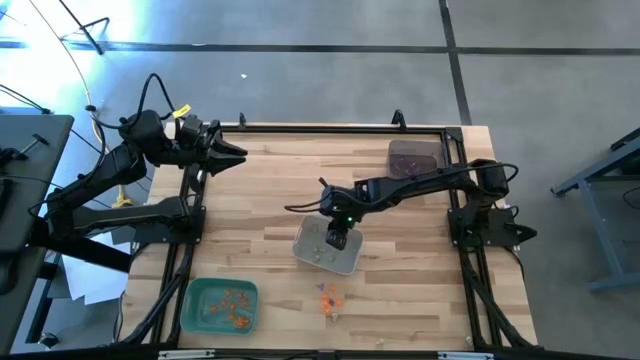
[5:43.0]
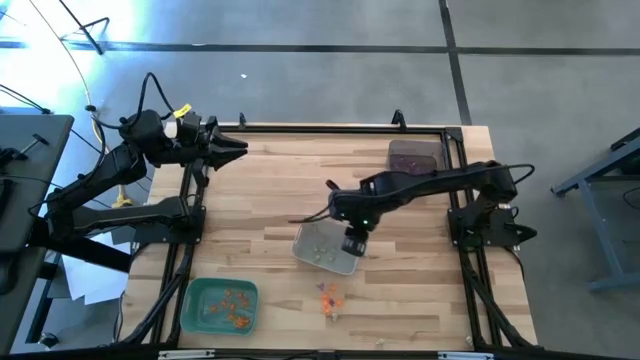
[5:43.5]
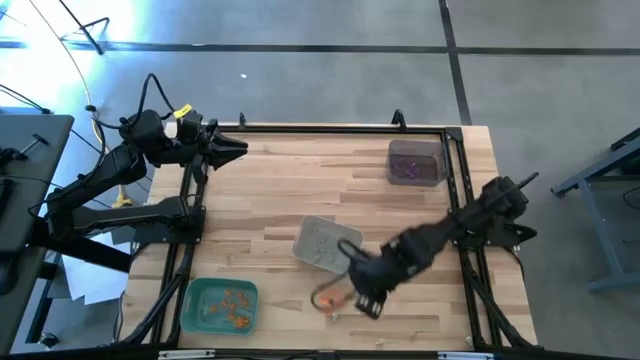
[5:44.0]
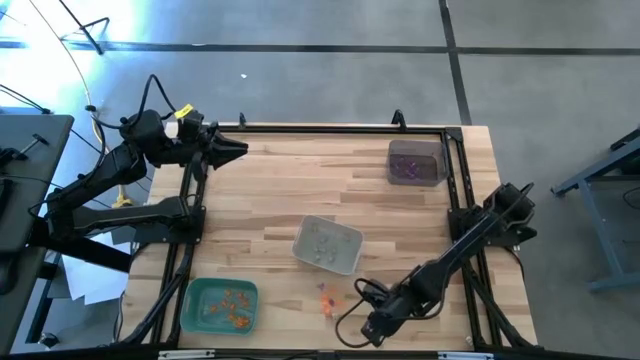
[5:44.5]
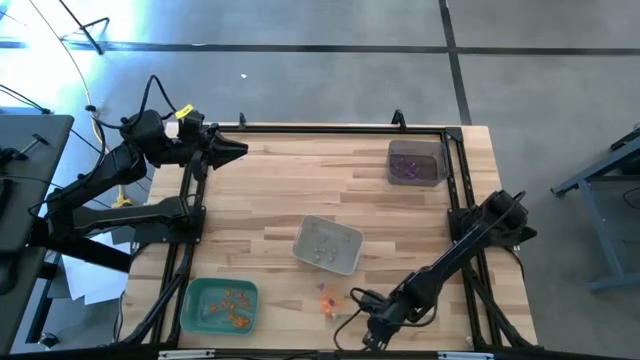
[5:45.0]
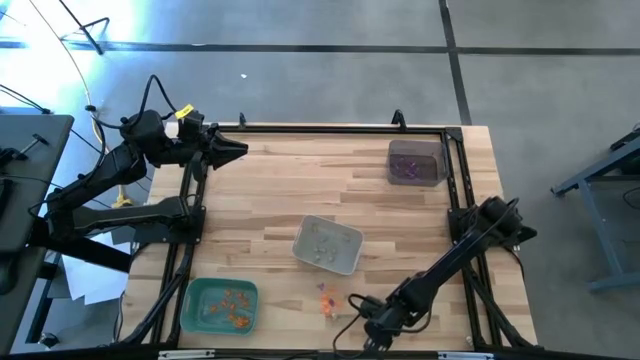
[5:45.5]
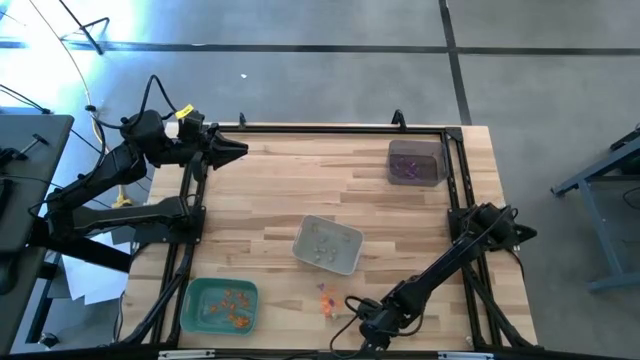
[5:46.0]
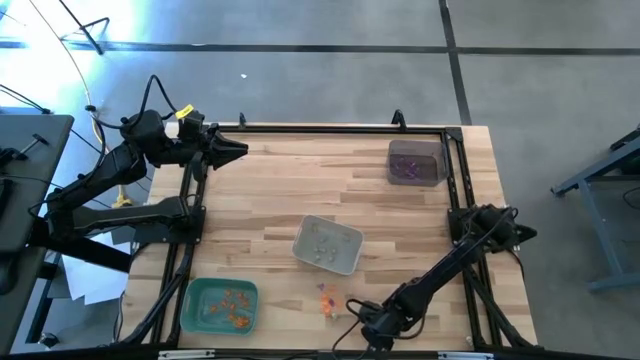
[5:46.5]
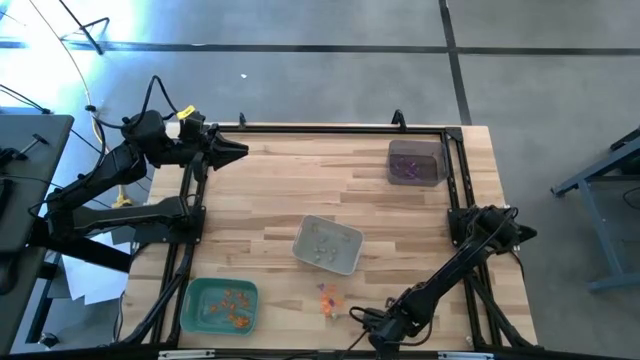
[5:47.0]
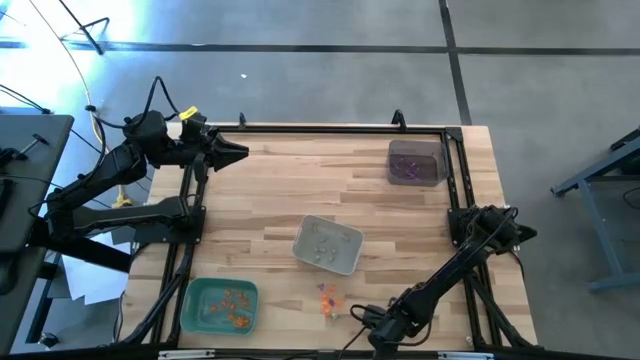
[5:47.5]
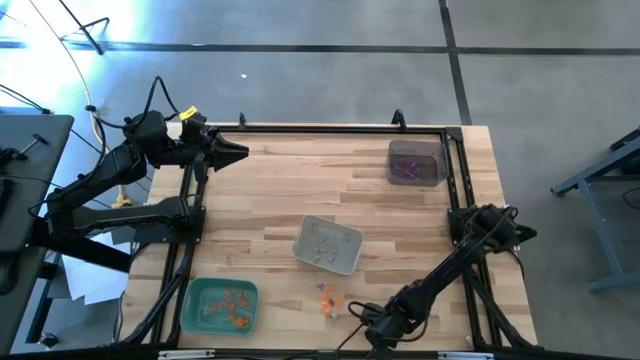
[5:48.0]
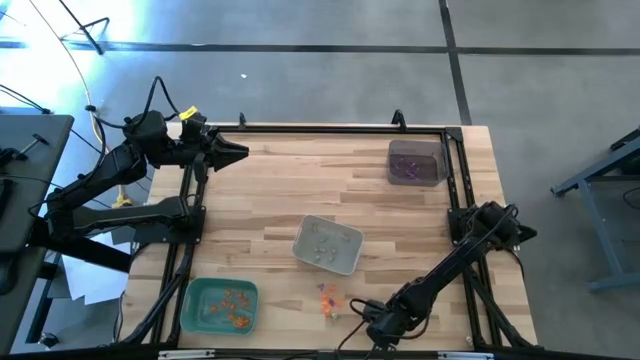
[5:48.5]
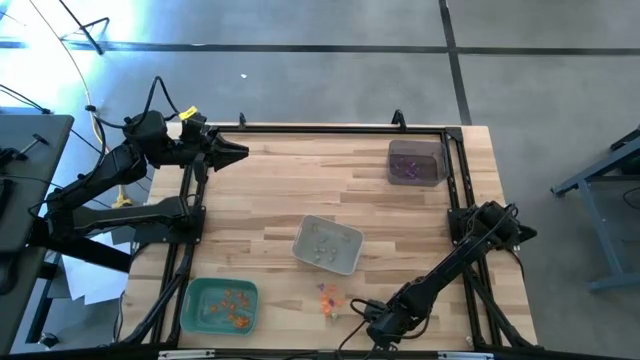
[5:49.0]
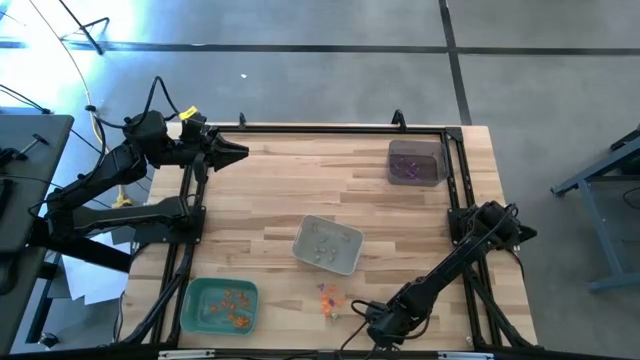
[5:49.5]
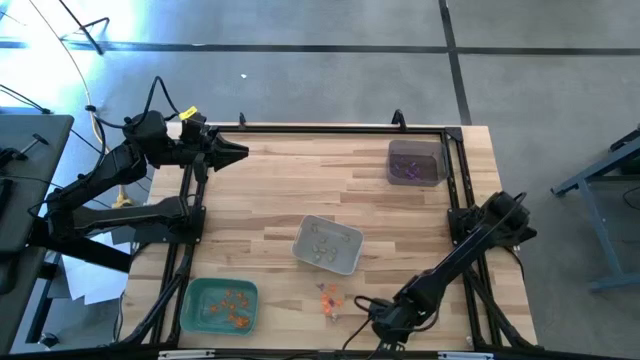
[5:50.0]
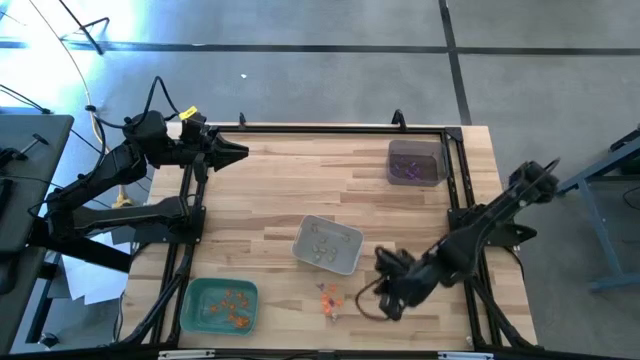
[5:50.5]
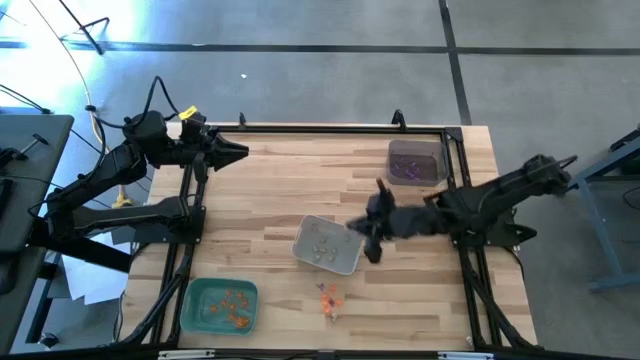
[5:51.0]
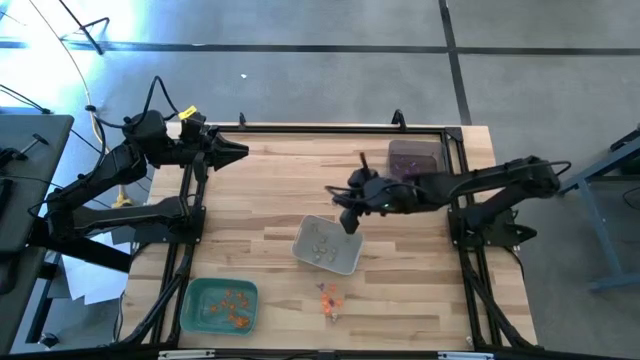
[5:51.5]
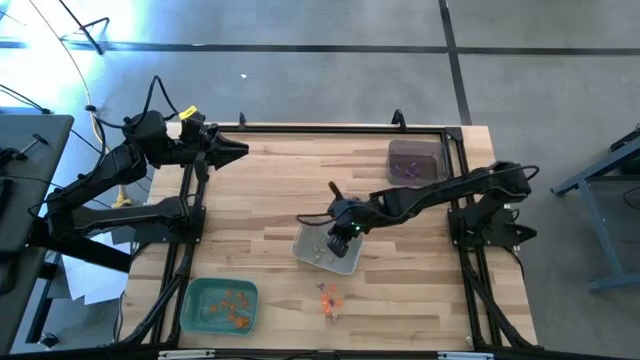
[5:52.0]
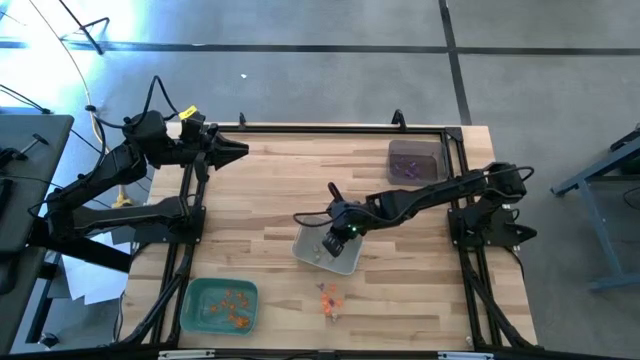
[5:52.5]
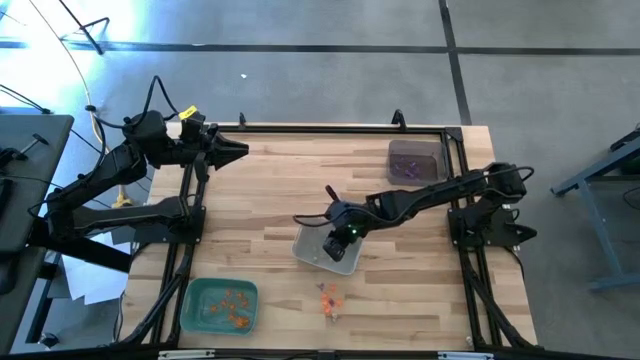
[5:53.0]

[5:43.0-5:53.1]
Task: Sort Halloween decoration
Put the white skull toy into the white bin

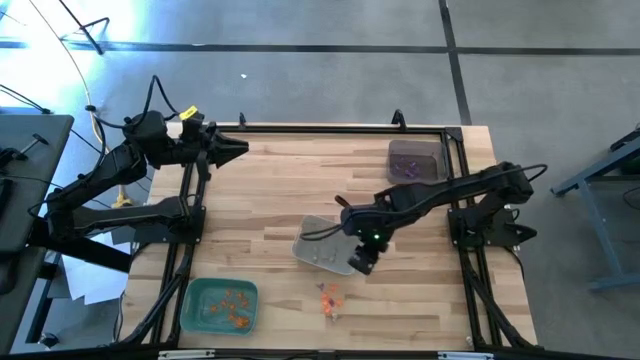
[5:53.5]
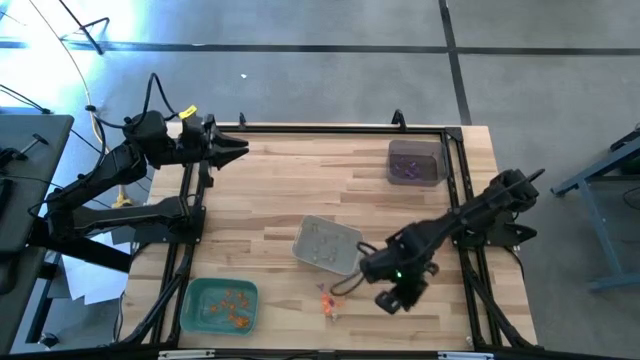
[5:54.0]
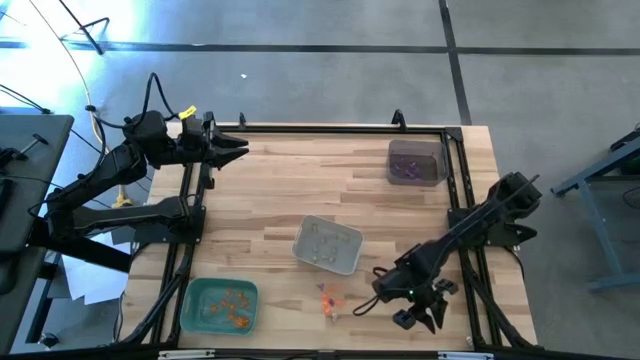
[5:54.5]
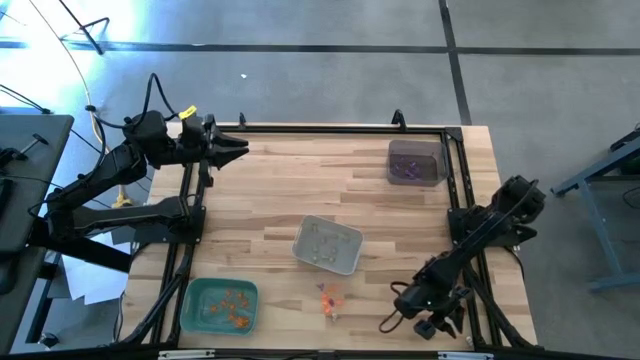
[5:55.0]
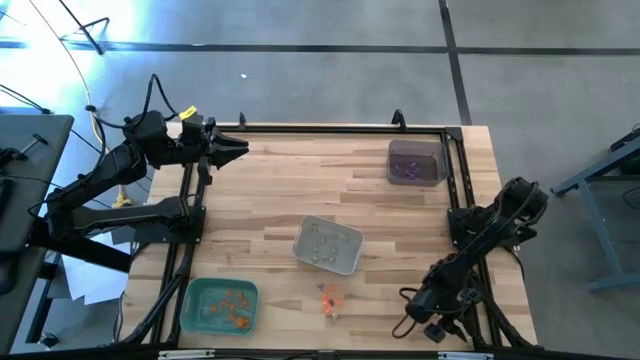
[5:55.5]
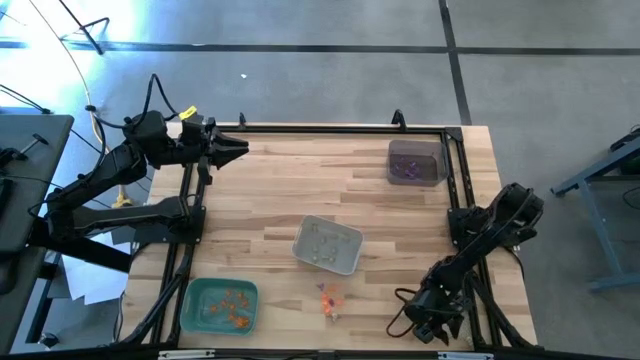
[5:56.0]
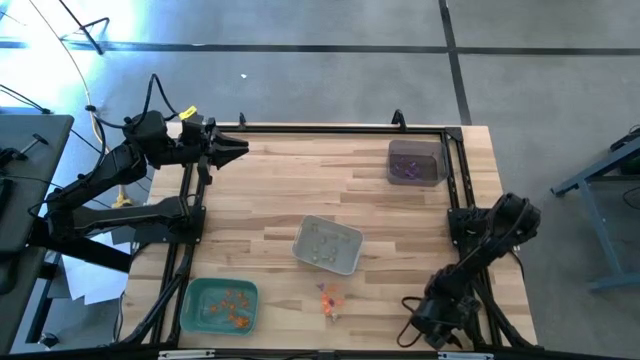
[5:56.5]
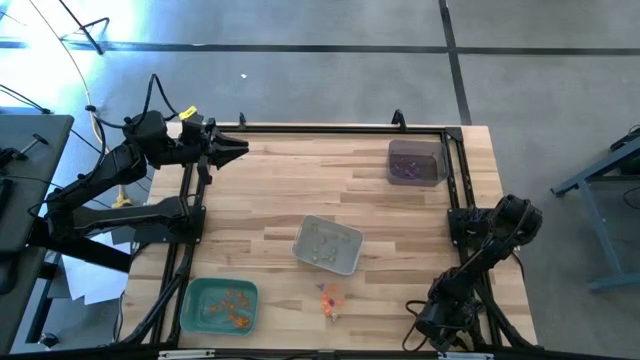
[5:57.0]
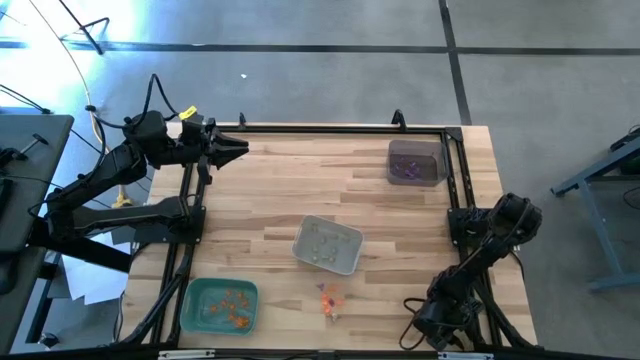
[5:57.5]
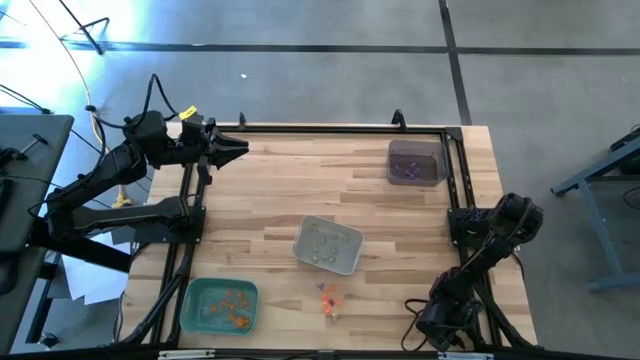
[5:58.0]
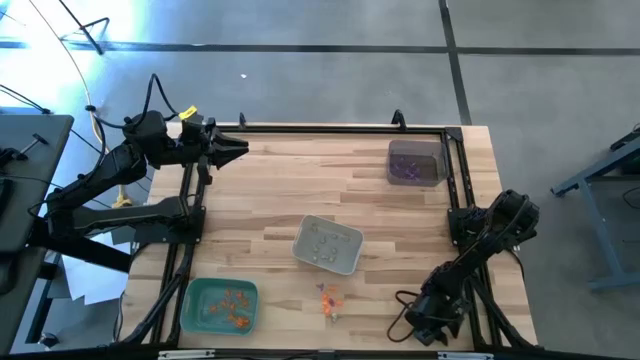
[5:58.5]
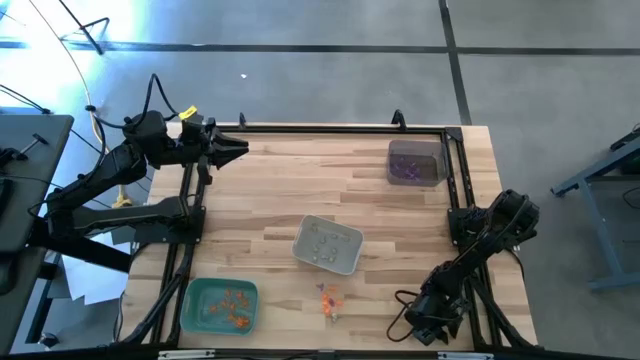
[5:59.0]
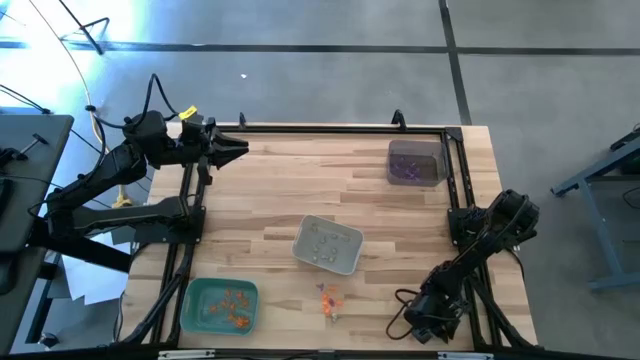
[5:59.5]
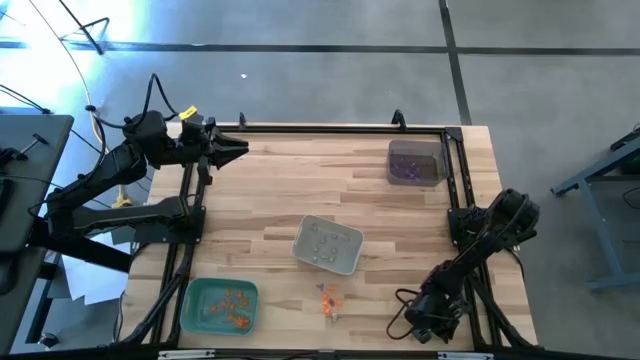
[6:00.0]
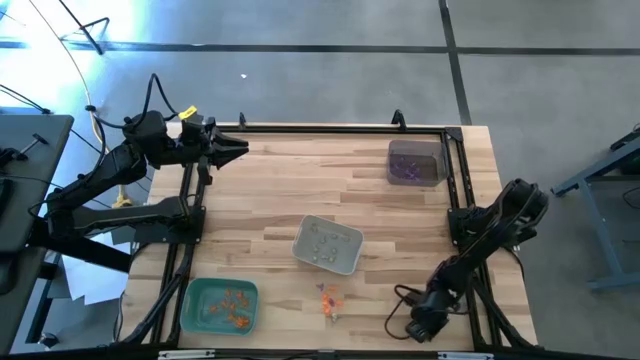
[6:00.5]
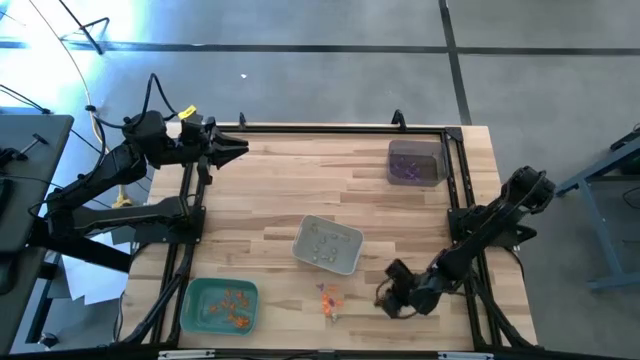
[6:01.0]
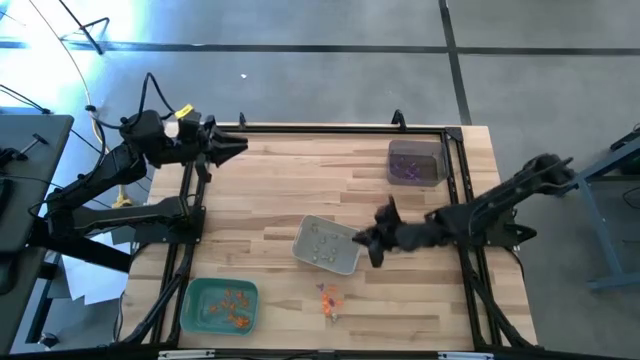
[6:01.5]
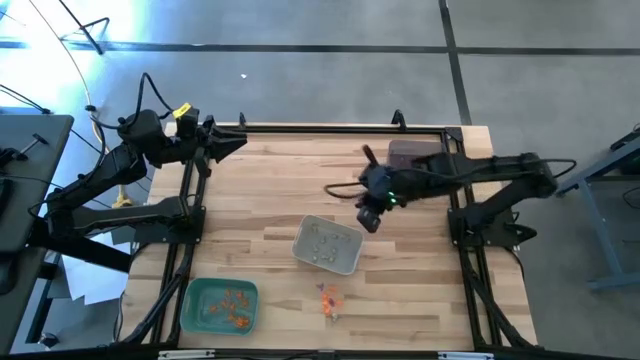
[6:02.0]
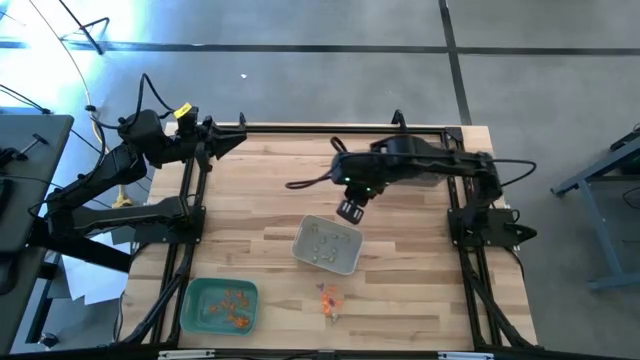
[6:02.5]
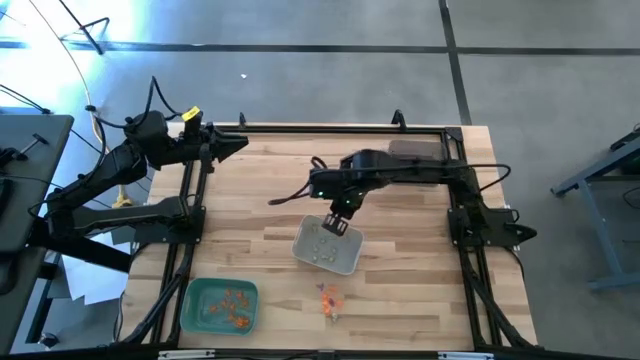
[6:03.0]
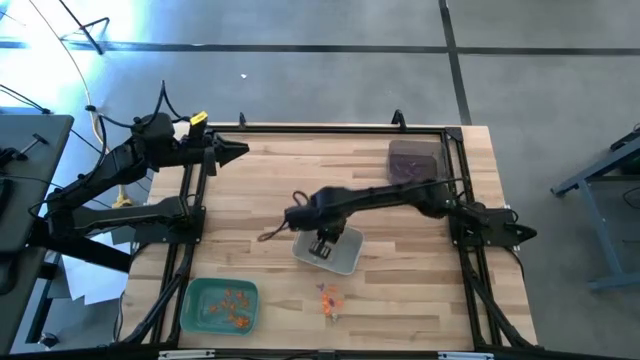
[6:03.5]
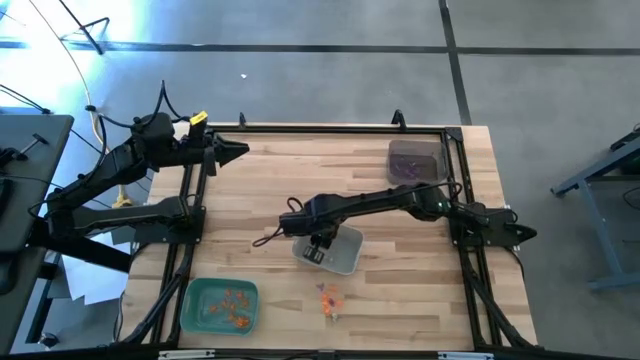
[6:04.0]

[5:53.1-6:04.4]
Put the white skull toy into the white bin
